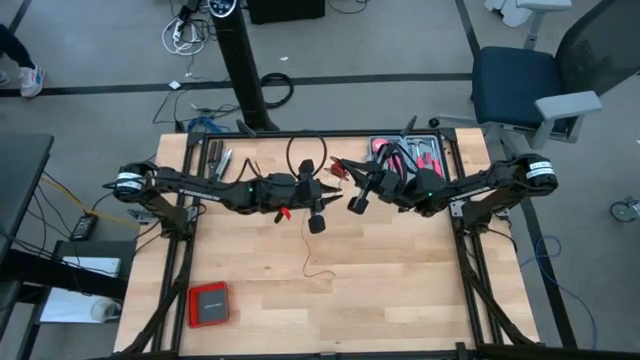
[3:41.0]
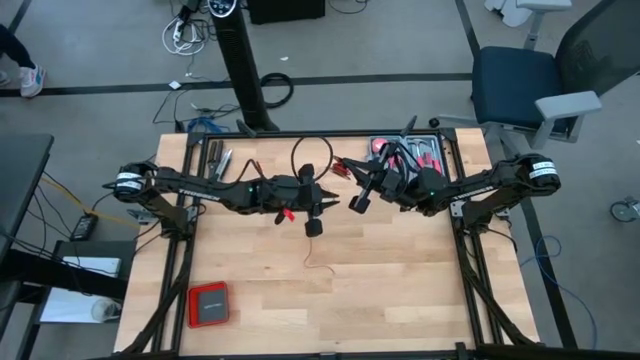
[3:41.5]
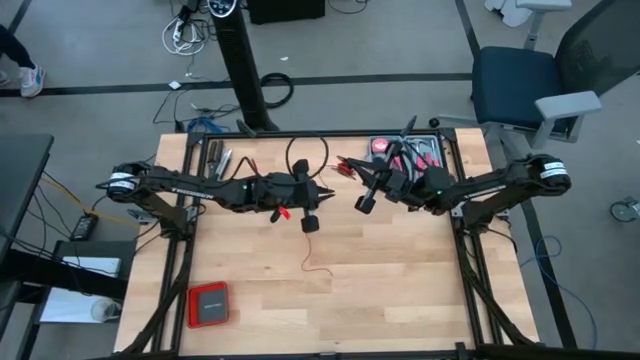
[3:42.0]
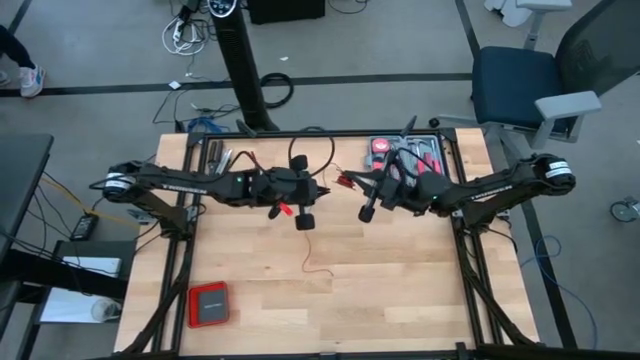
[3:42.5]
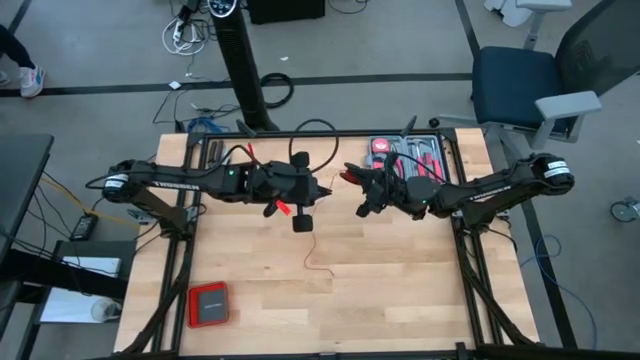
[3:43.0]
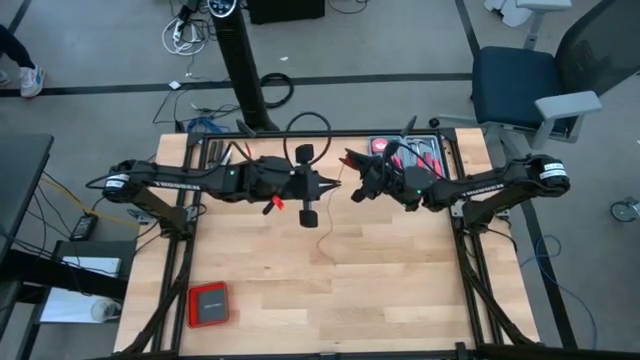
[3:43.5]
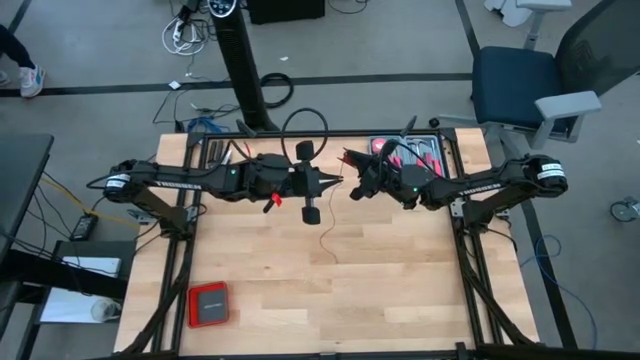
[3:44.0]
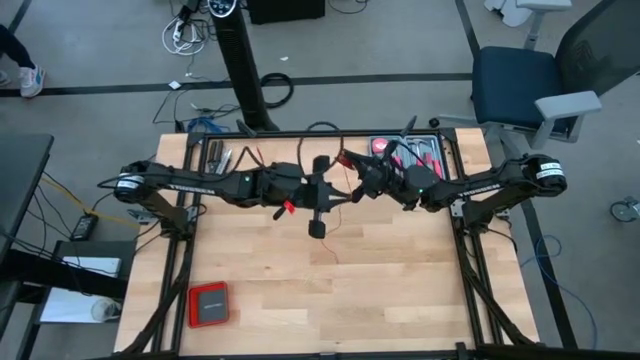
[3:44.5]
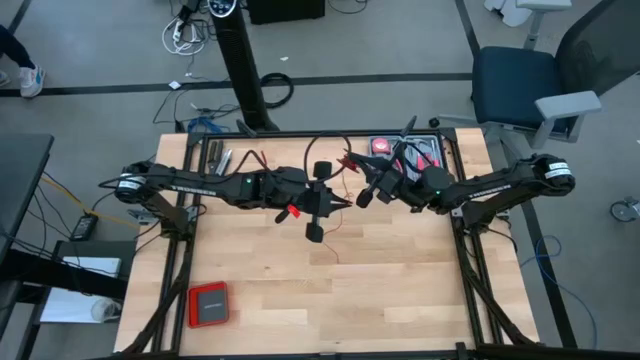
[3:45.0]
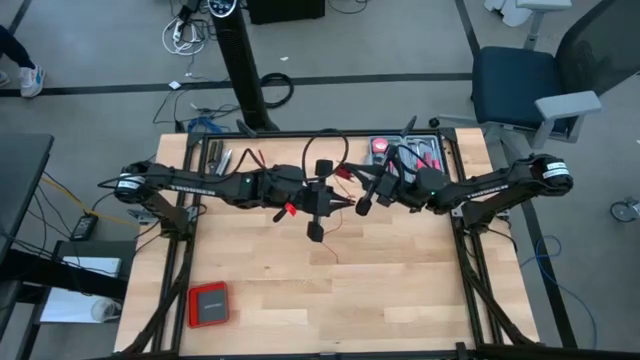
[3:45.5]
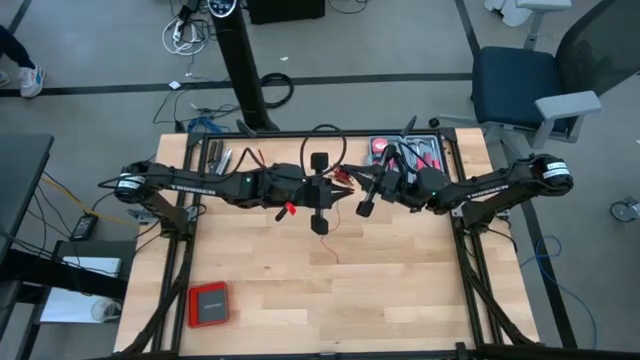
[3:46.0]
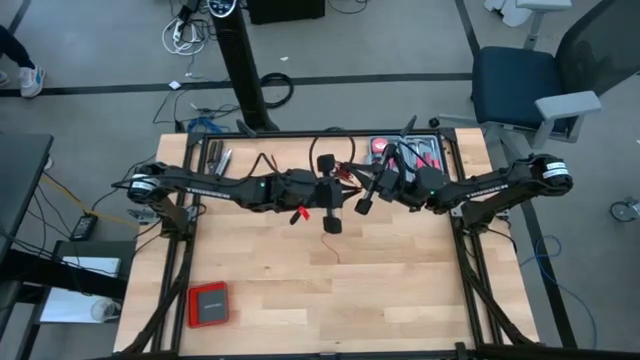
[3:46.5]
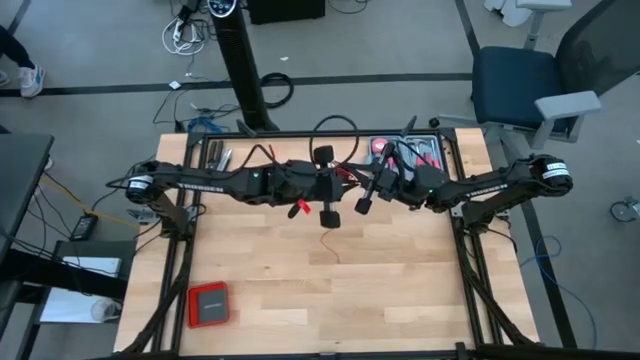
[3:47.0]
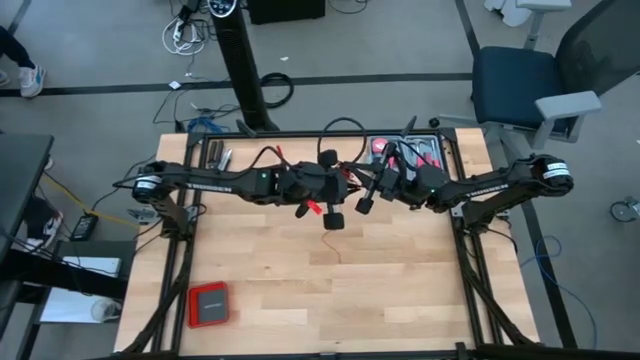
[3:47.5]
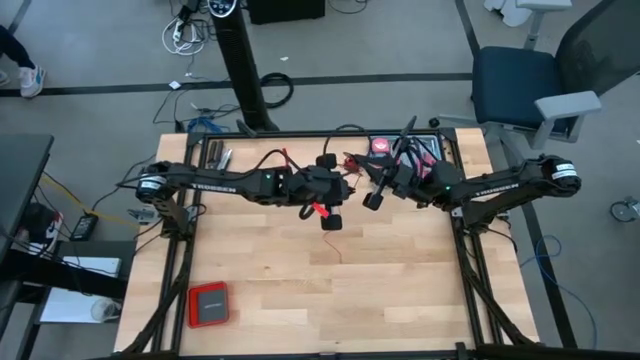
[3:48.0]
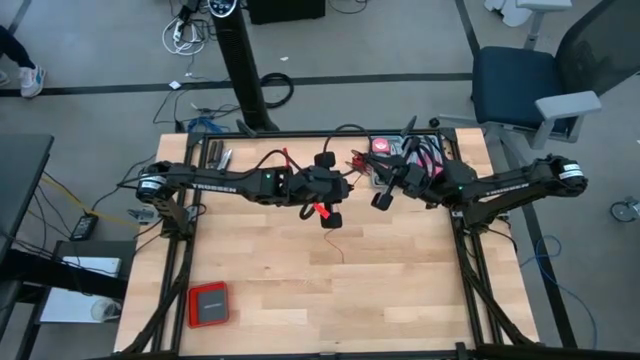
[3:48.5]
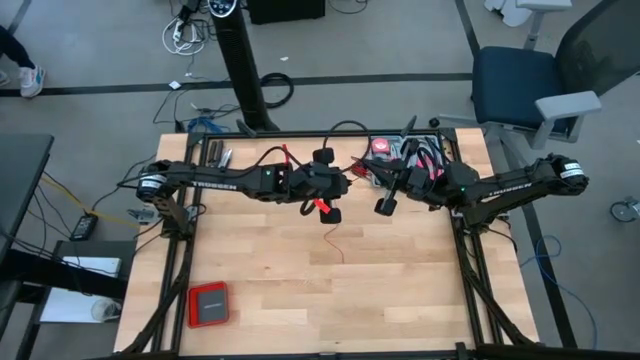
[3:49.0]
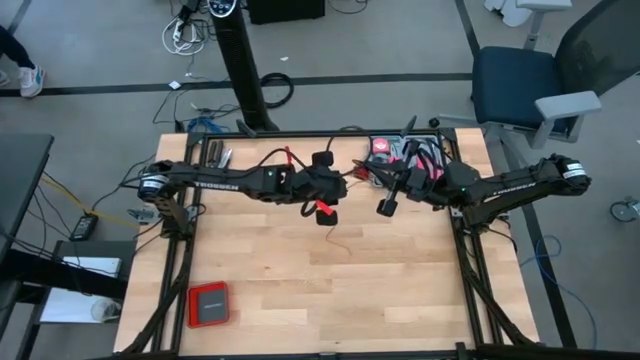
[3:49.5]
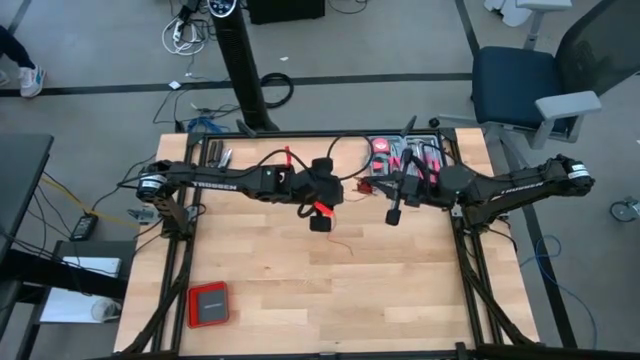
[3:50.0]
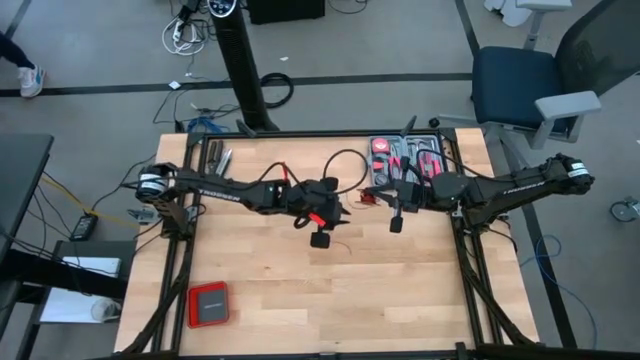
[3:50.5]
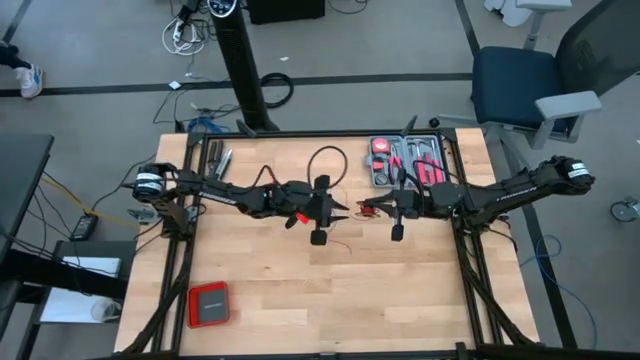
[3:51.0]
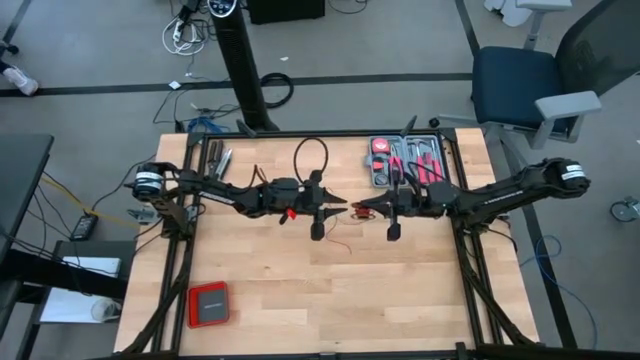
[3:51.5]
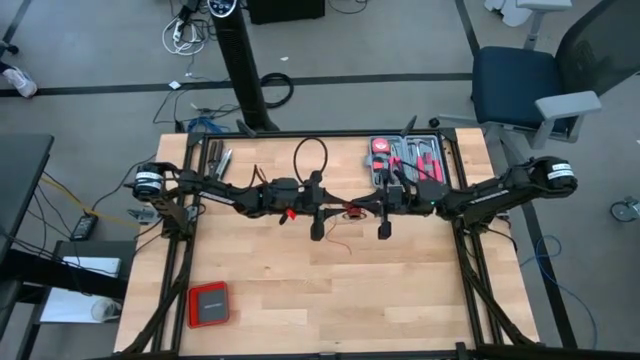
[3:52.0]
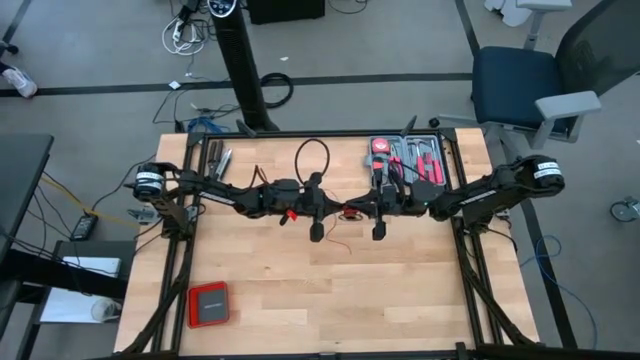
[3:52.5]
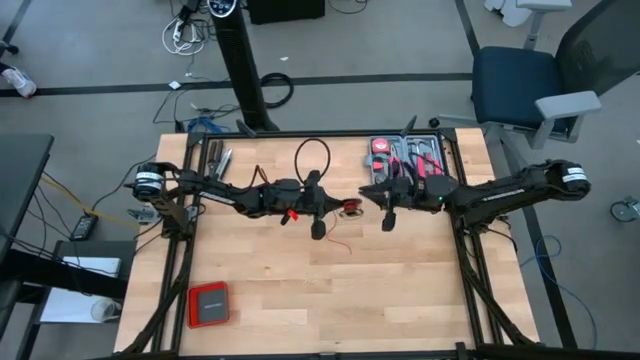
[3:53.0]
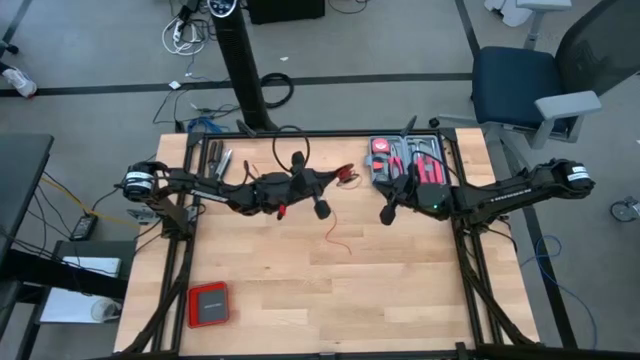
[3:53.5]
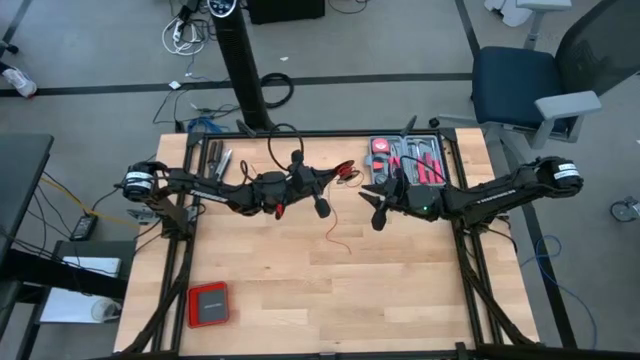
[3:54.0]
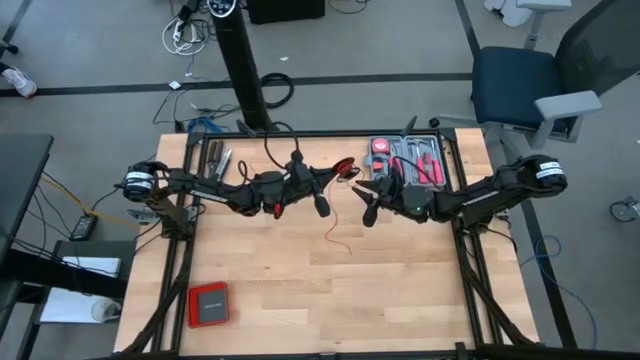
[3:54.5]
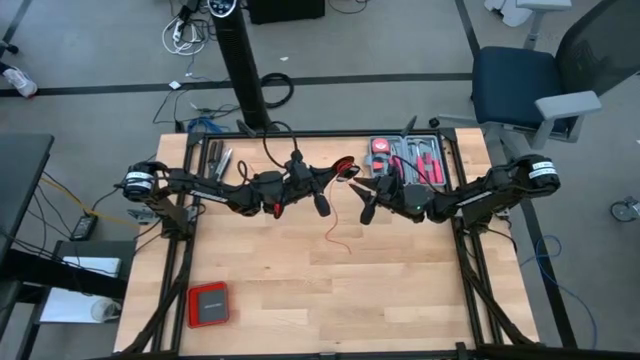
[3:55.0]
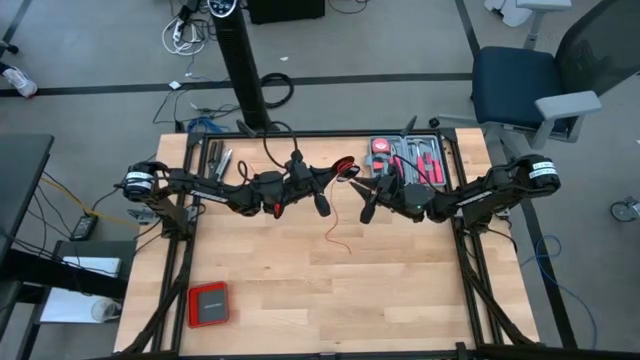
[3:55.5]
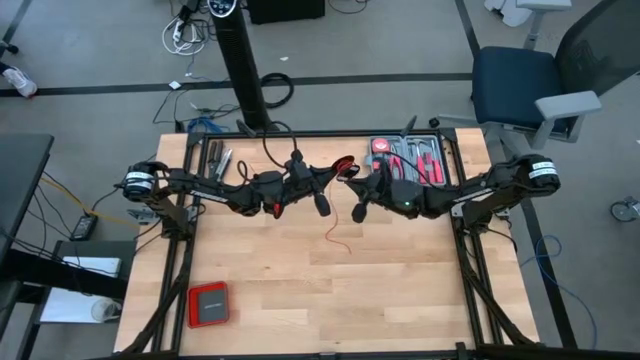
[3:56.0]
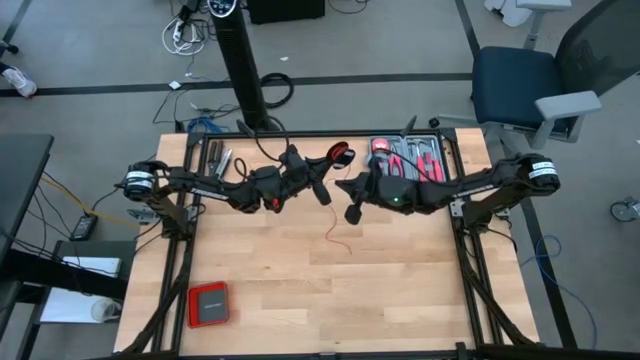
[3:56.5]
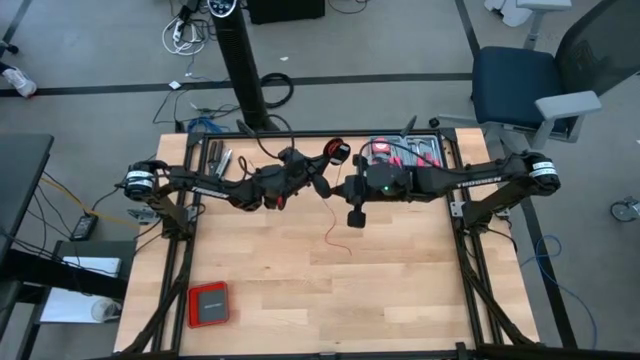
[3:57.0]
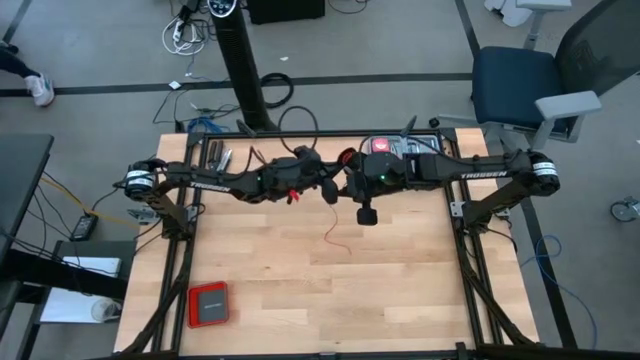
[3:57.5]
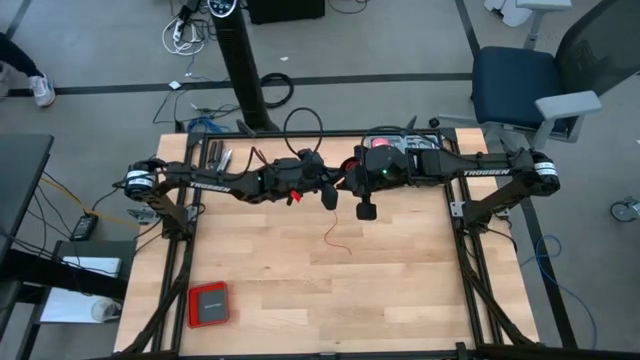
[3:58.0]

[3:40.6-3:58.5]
Task: Coil cords
Coil the red cable wire onto the black spool

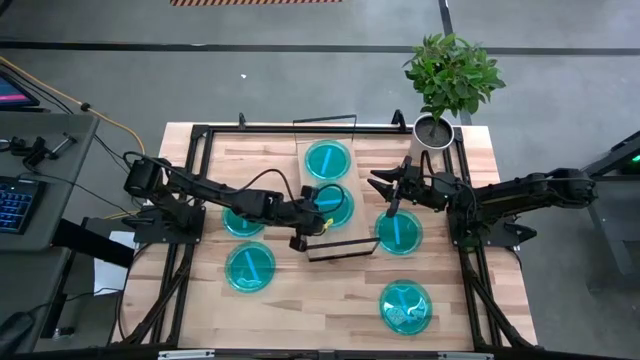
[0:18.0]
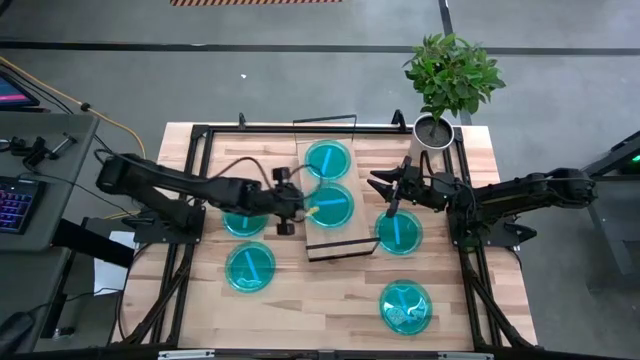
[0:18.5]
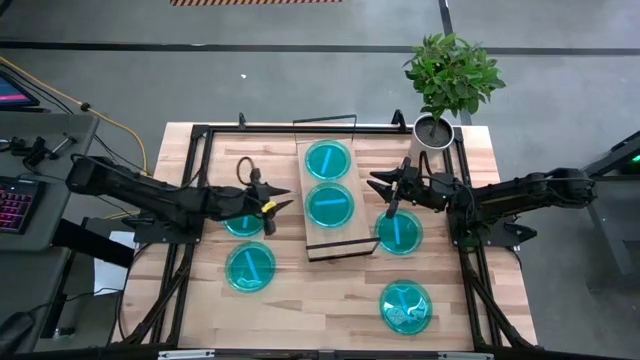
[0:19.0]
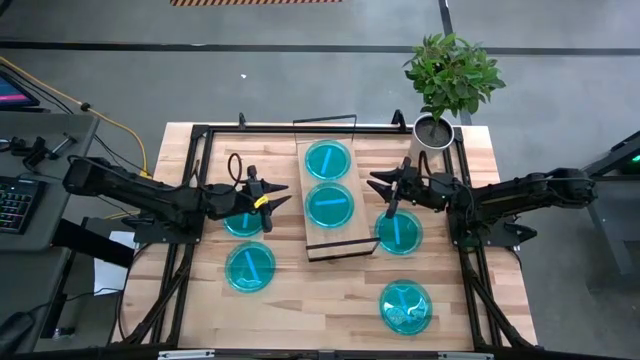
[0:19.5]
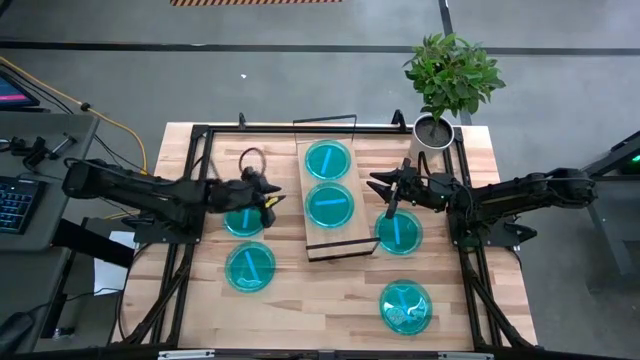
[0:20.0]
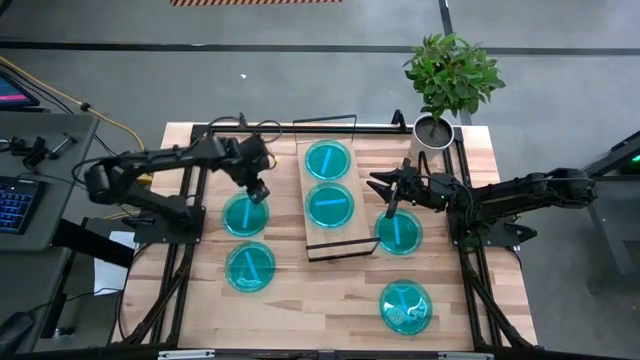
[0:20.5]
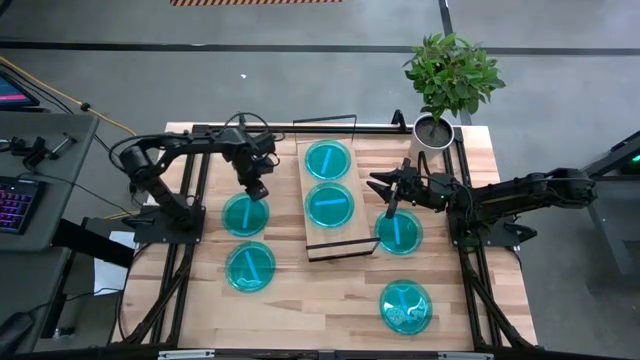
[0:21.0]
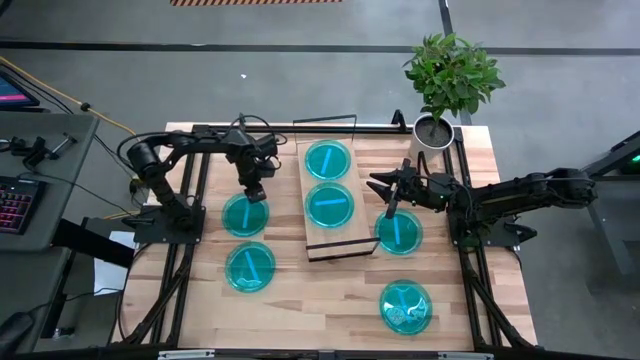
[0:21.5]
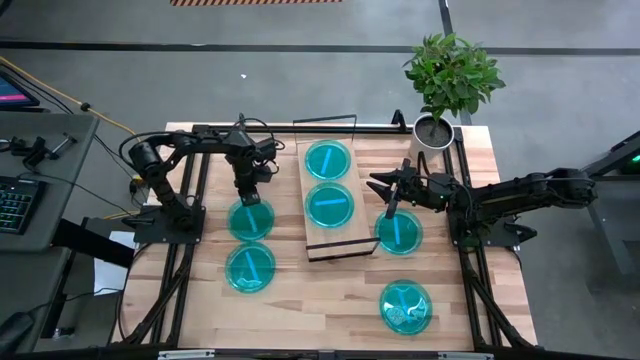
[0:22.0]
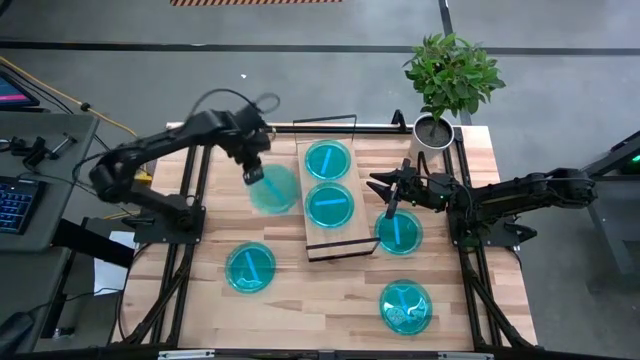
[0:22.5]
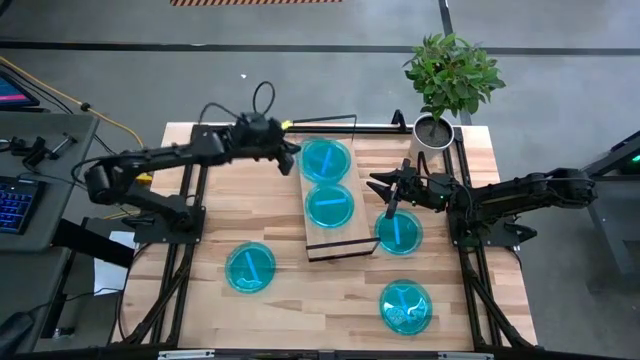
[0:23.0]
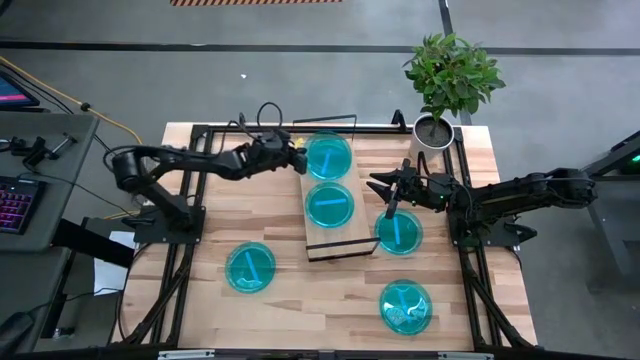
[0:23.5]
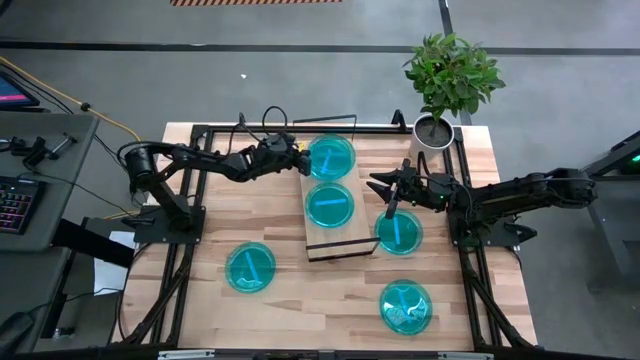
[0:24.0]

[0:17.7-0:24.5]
Task: Place and stack plates onto a shelf
Stack the blue plate on top of the blue plate on the shelf
